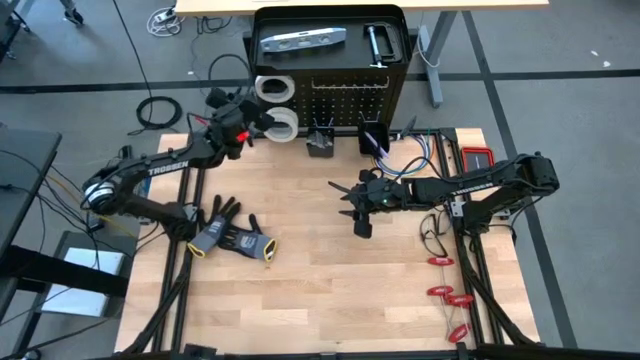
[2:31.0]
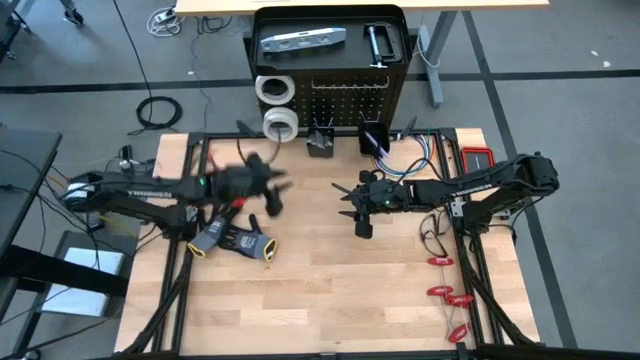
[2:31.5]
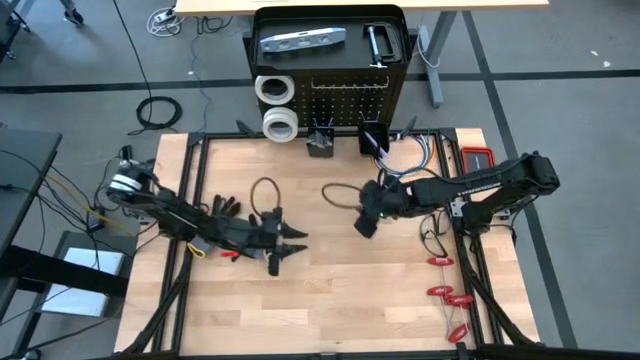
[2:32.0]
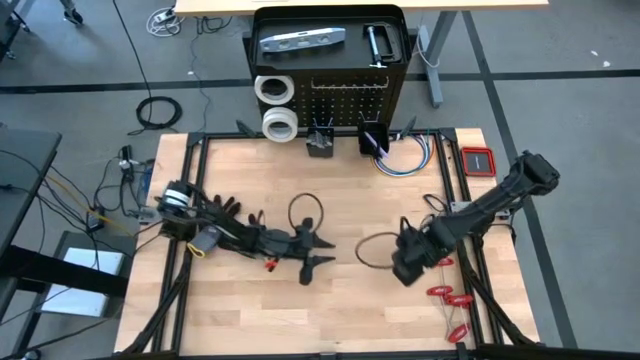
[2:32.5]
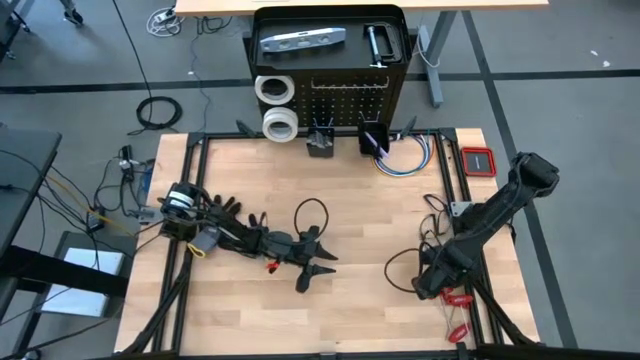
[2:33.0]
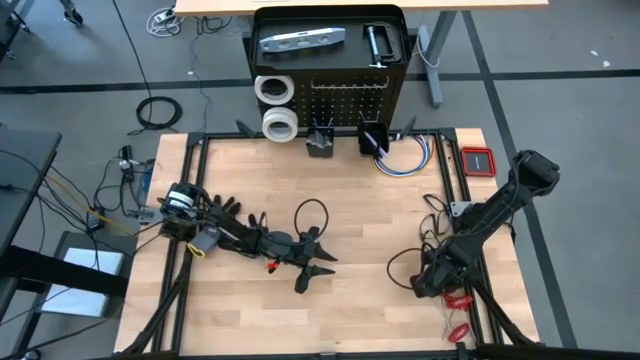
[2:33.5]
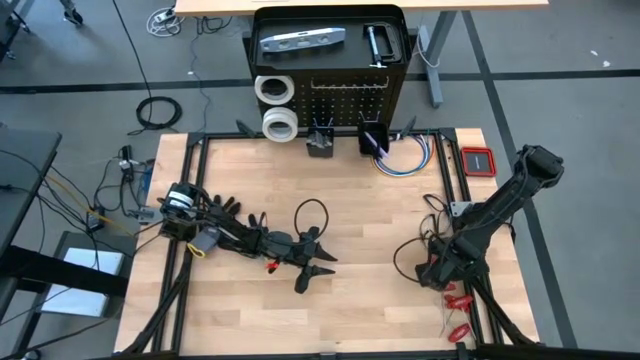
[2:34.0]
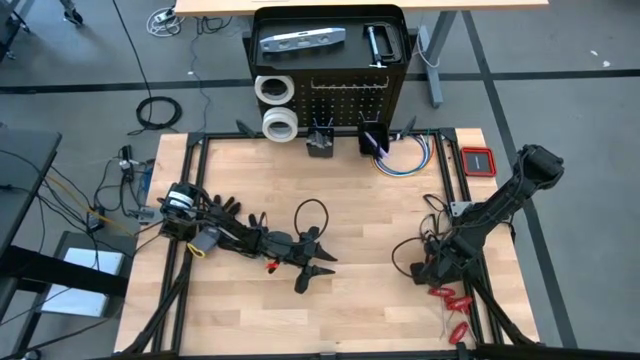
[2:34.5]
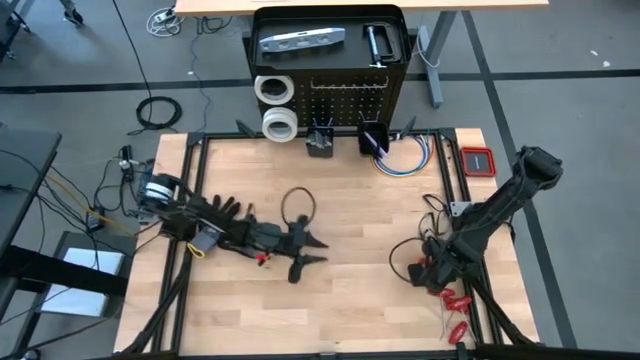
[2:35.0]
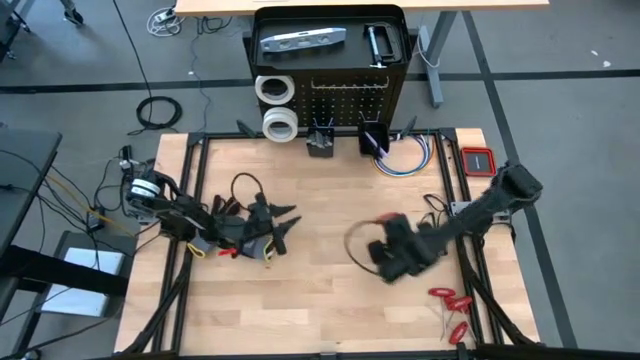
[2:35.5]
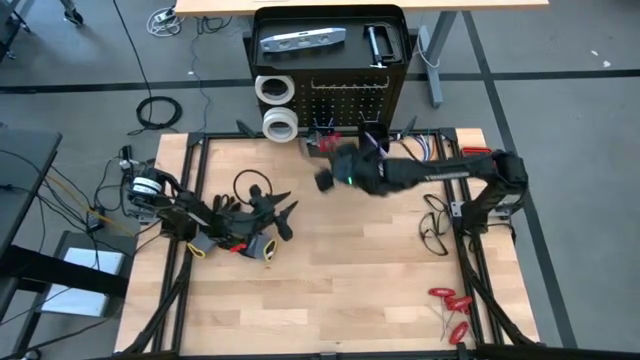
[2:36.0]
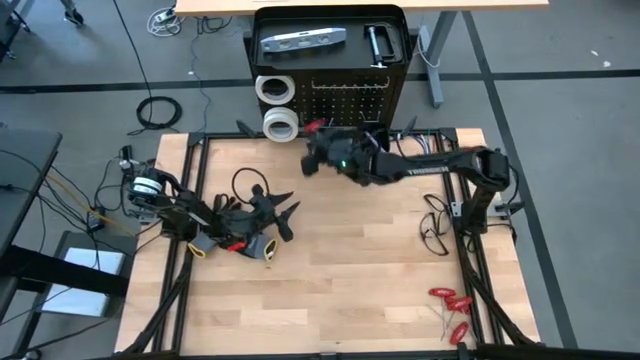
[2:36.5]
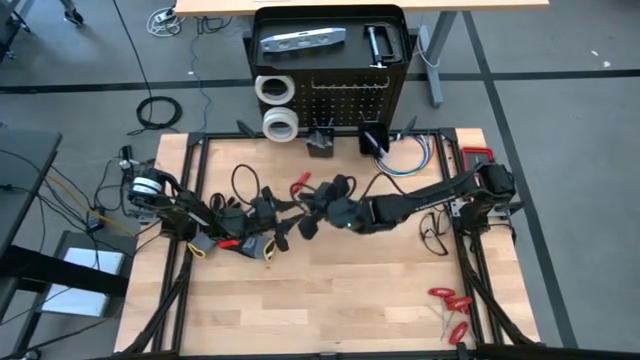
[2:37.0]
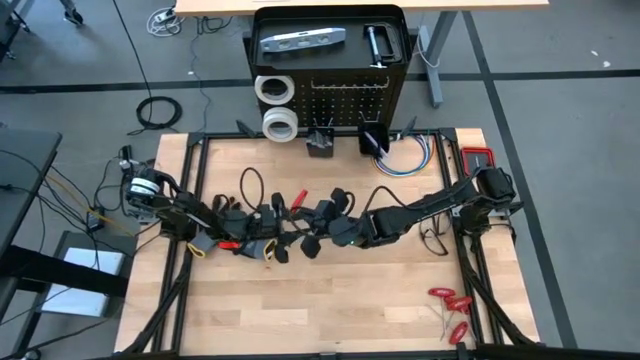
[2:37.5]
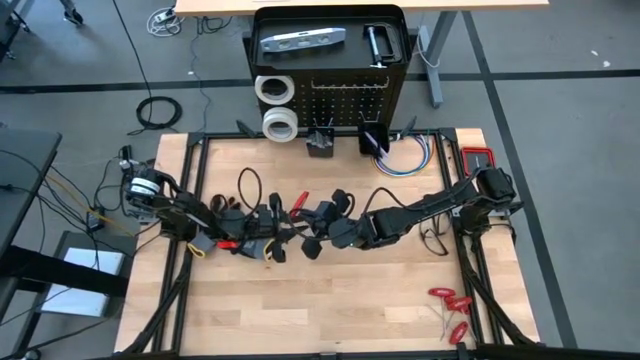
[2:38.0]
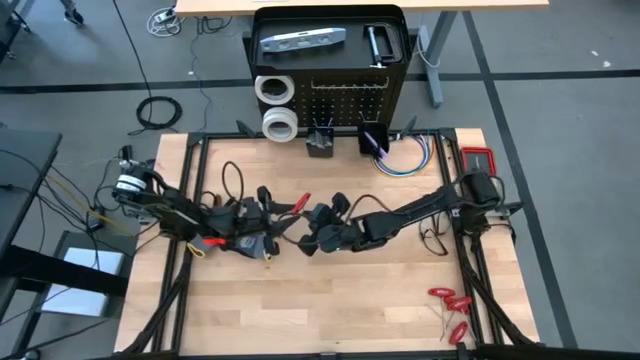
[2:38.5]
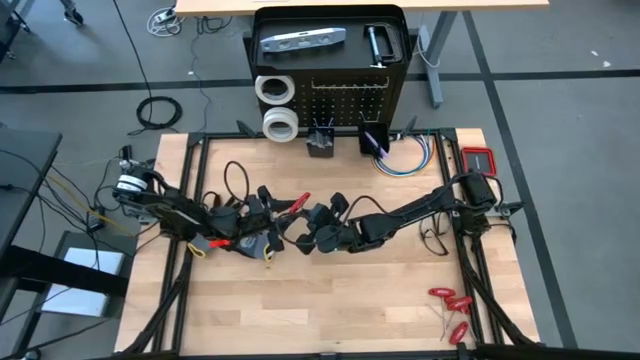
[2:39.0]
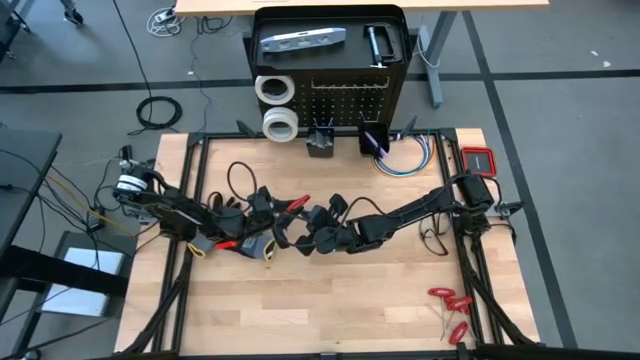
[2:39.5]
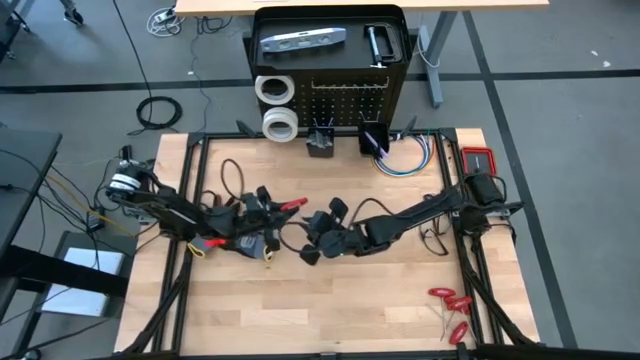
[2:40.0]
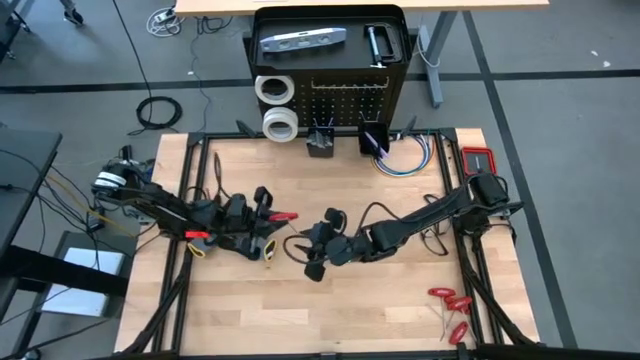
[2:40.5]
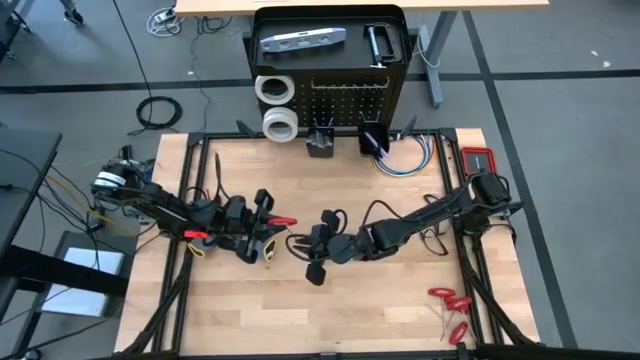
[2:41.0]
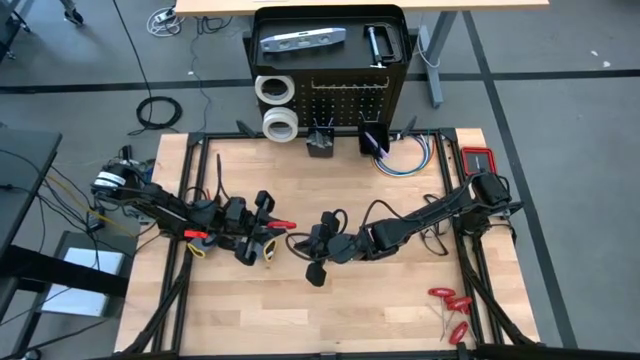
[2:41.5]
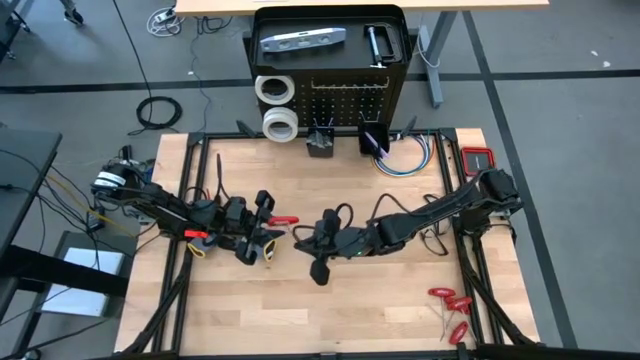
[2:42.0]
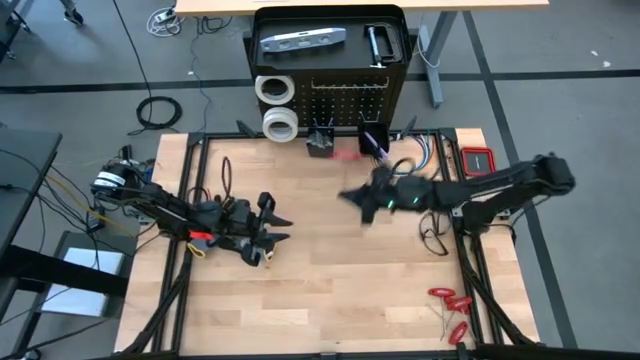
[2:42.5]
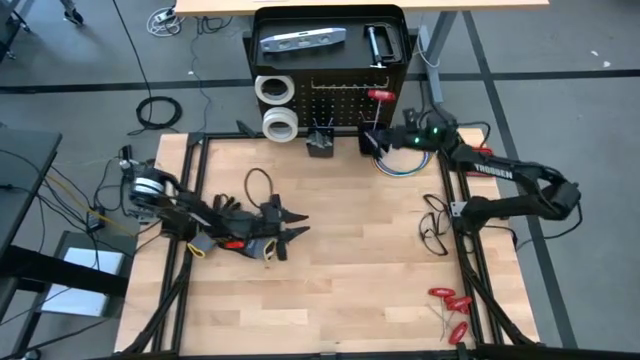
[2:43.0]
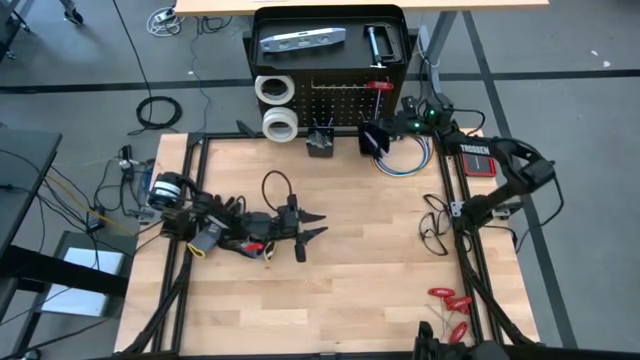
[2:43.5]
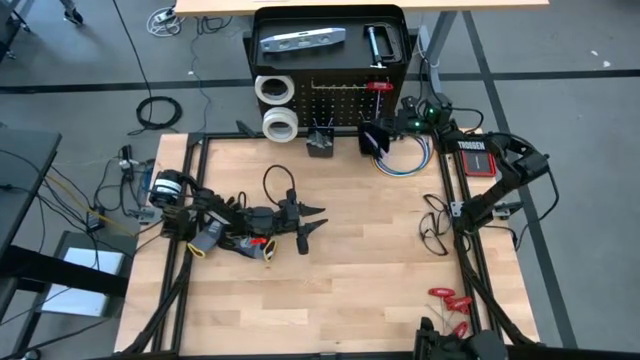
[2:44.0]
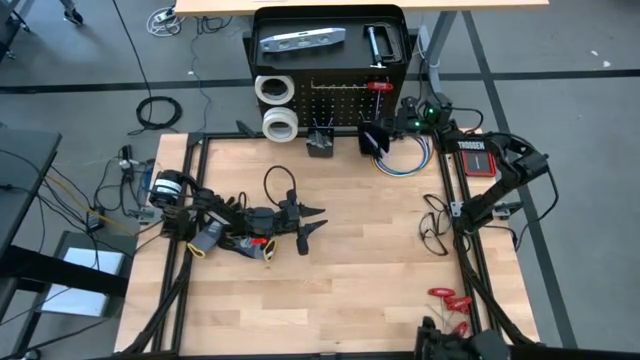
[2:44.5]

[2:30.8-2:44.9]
Task: Hang tools onto peg board
Hang the allen wrench on the peg board

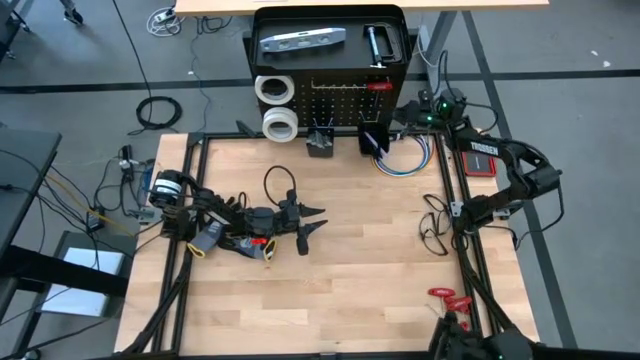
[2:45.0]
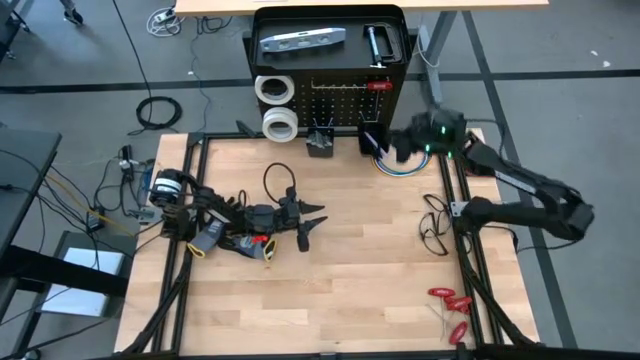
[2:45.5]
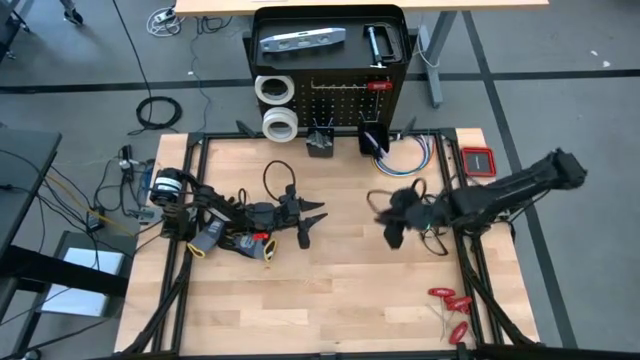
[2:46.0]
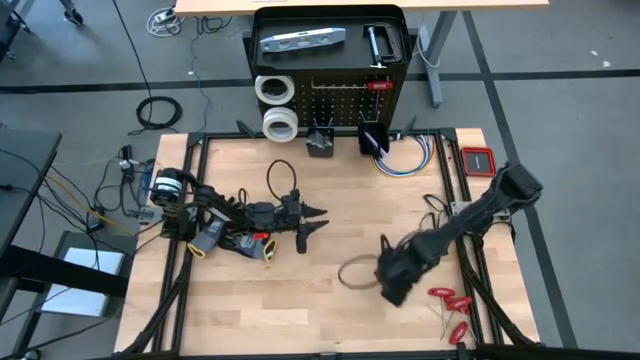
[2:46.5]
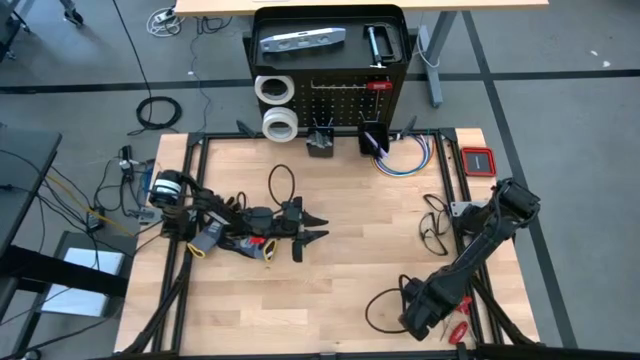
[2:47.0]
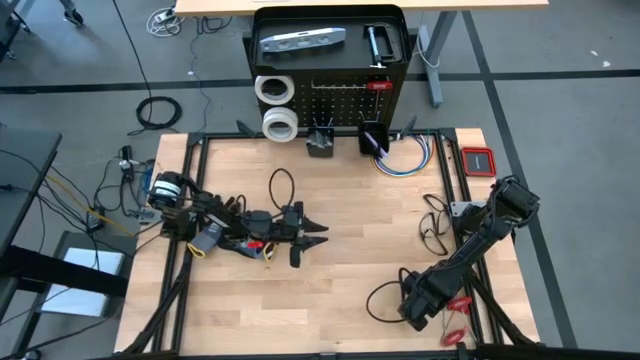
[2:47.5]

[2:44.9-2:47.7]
Hang the allen wrench on the peg board

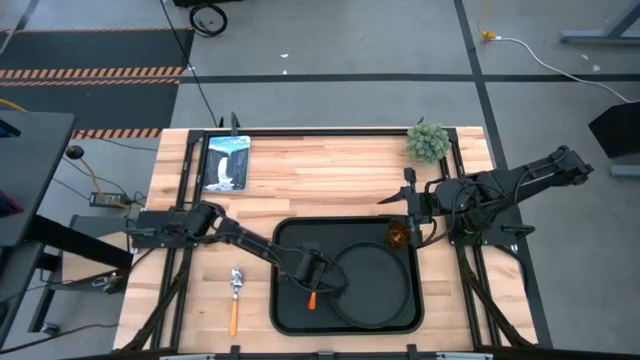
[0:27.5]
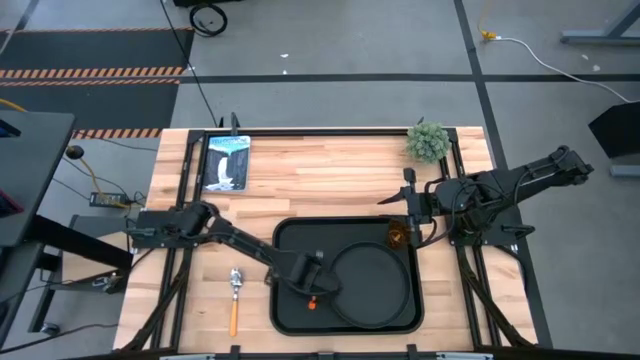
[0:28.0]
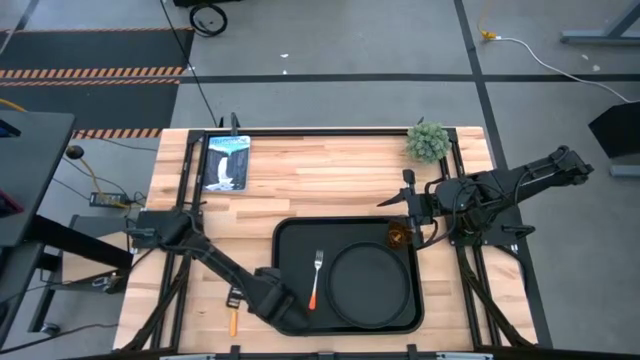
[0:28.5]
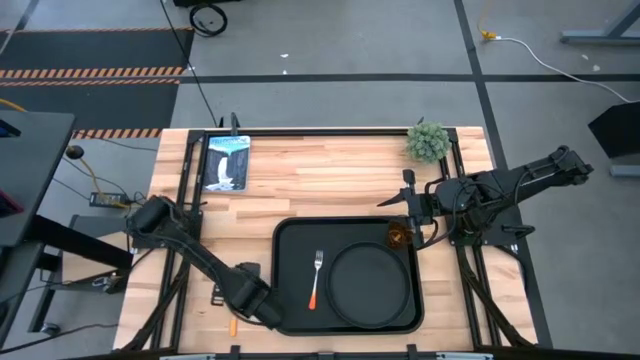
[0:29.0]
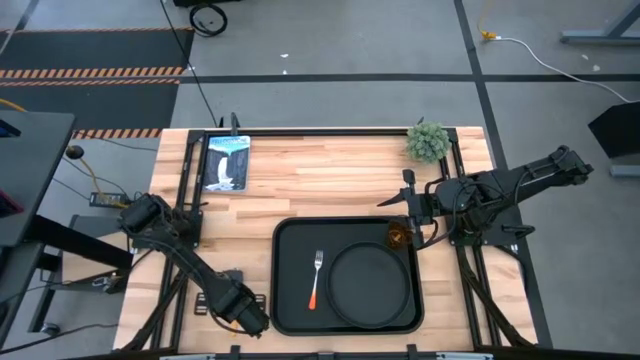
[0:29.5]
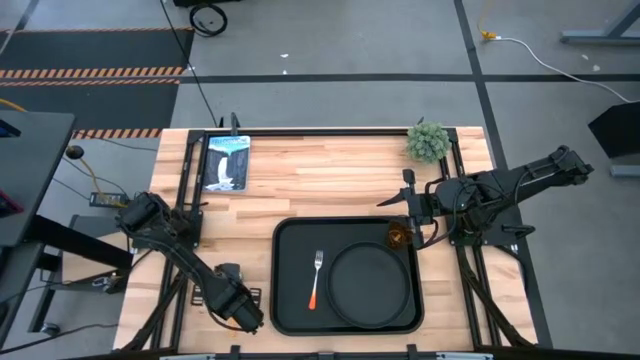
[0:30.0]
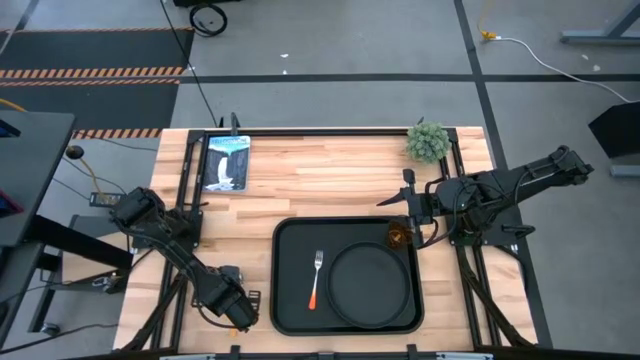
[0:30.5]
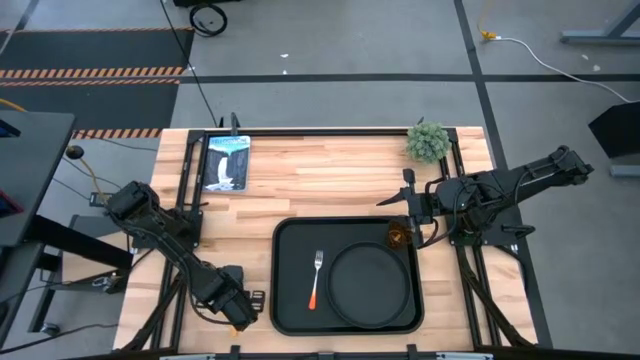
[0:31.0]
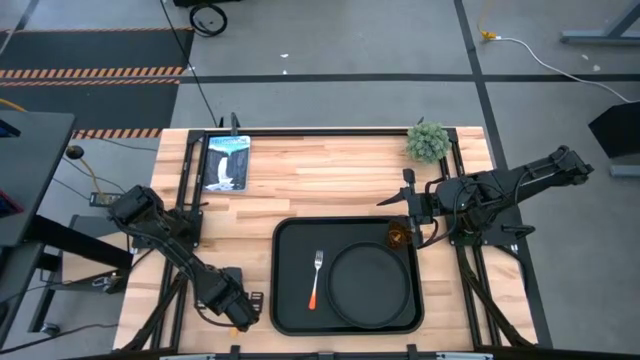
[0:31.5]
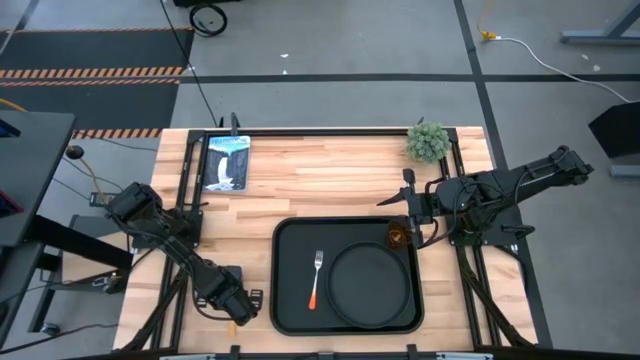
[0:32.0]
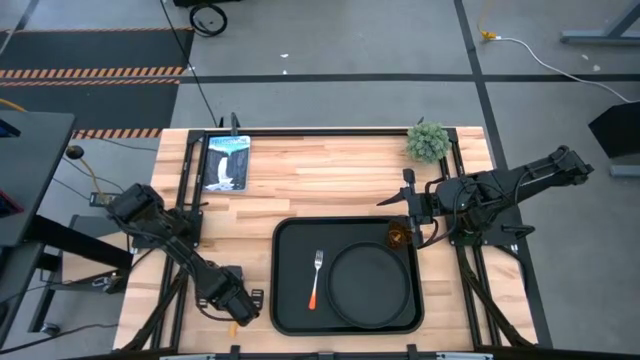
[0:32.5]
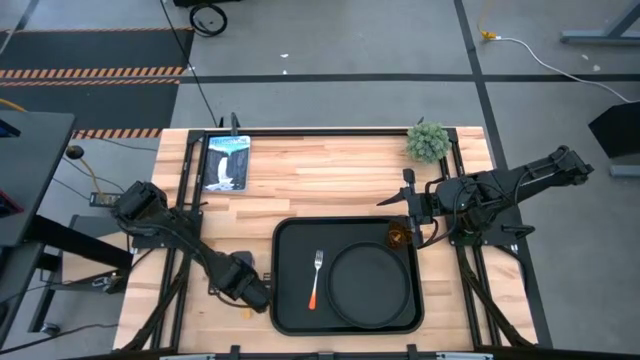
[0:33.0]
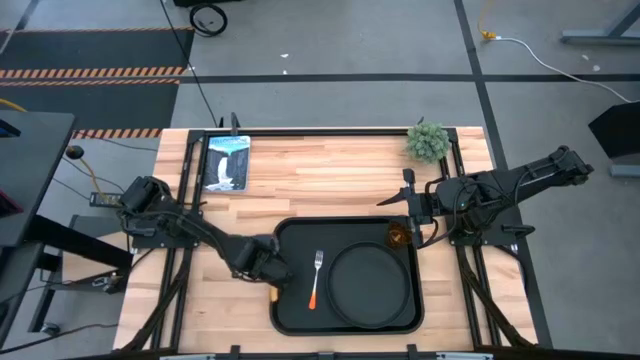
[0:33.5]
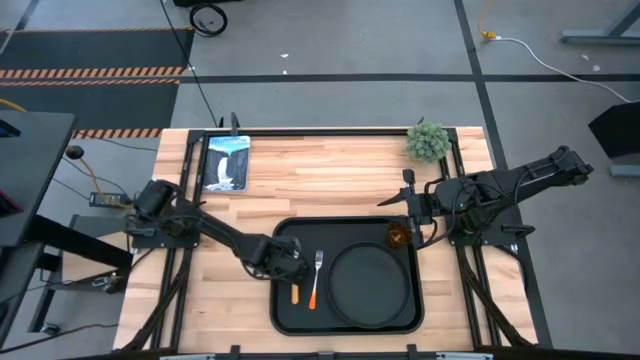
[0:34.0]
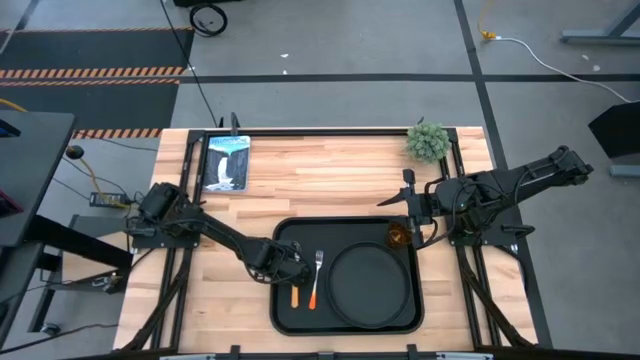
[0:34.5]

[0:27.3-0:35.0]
Task: Pick and place plate/cup/fork/spoon on tray
Put the green spoon on the black serving tray to the left side of the orange fork
